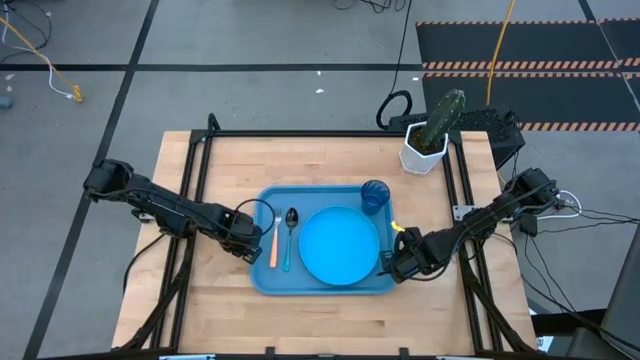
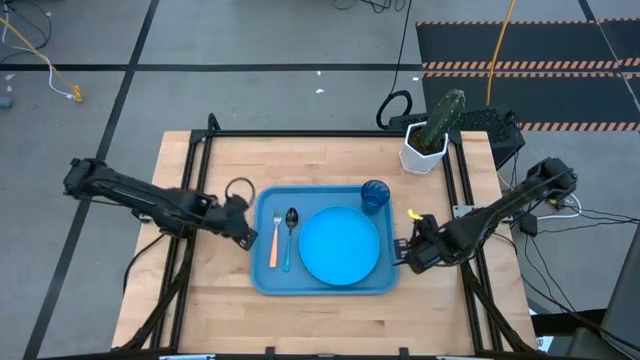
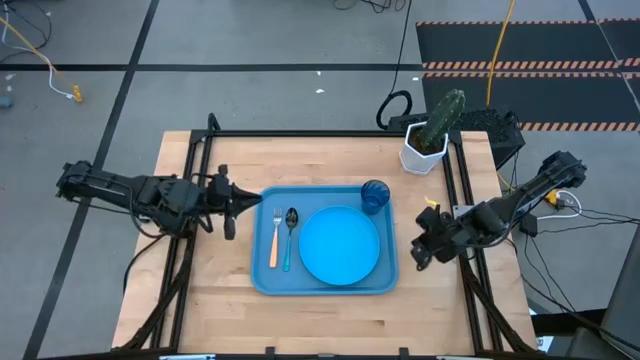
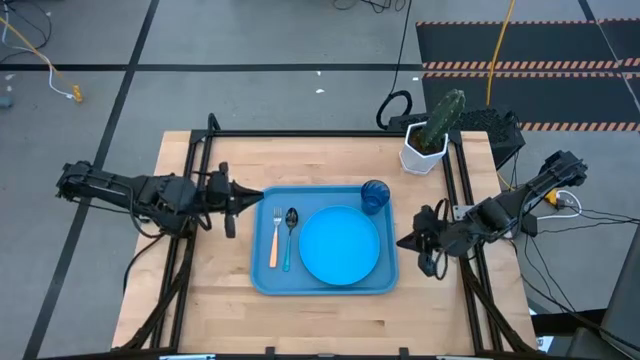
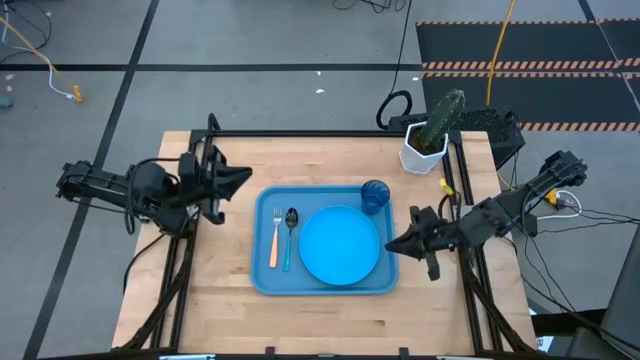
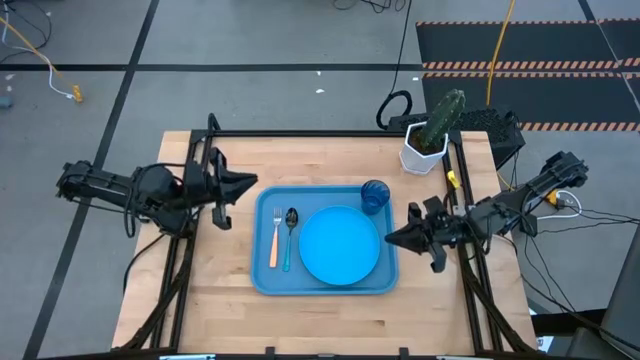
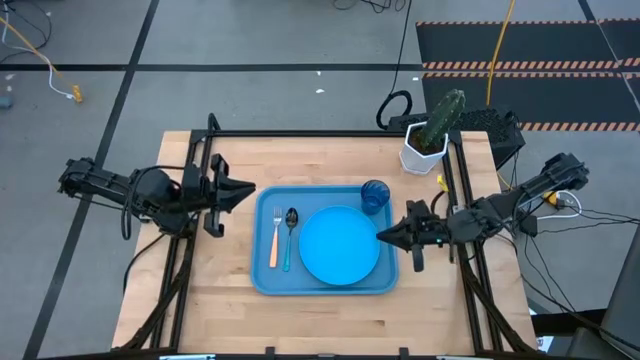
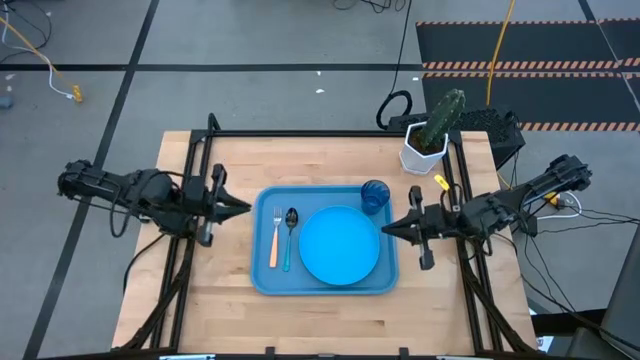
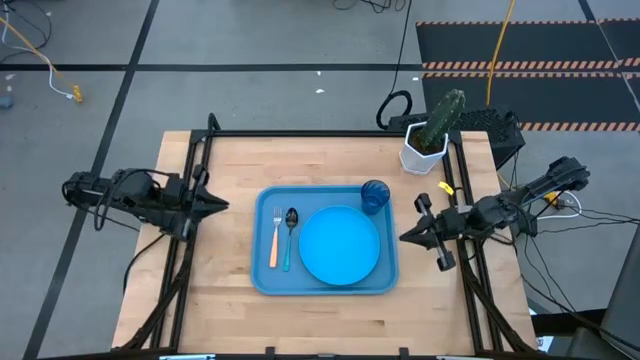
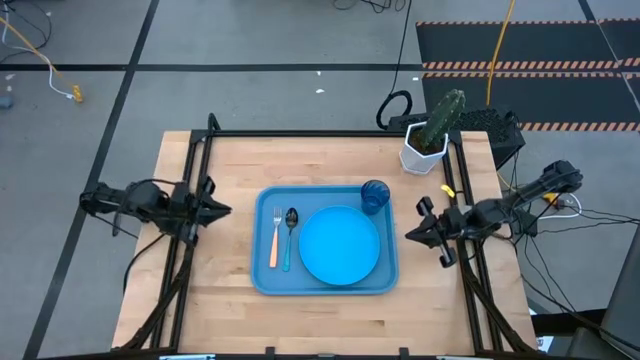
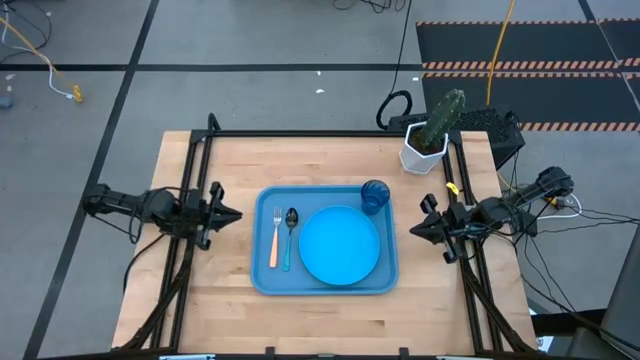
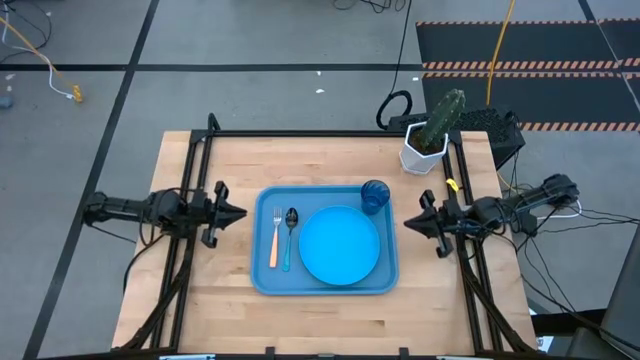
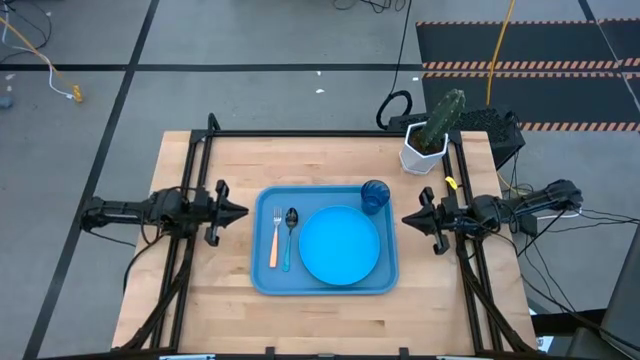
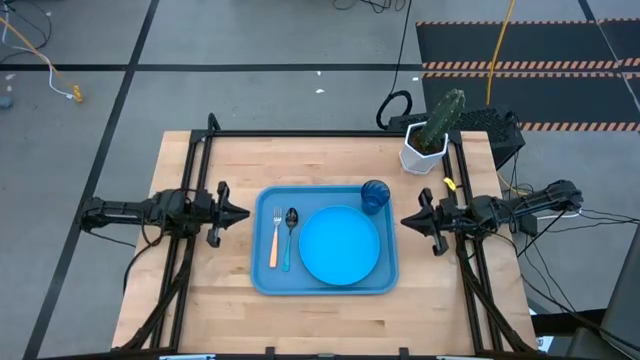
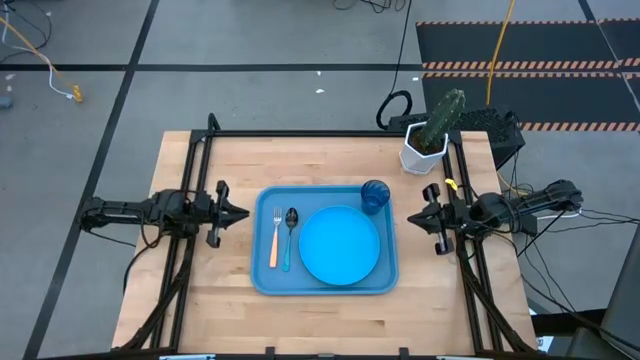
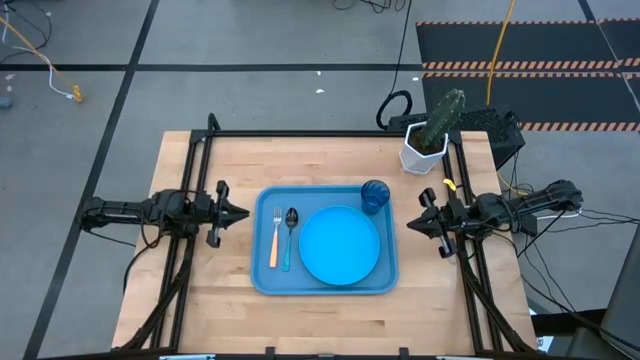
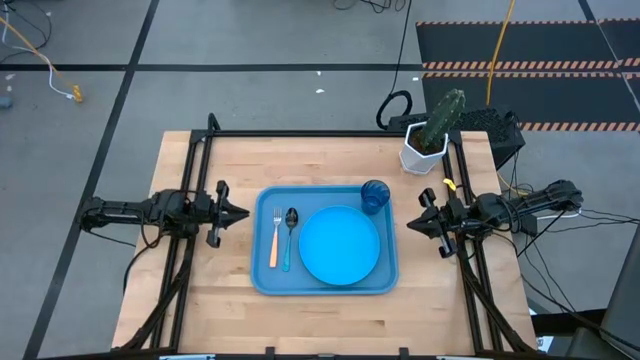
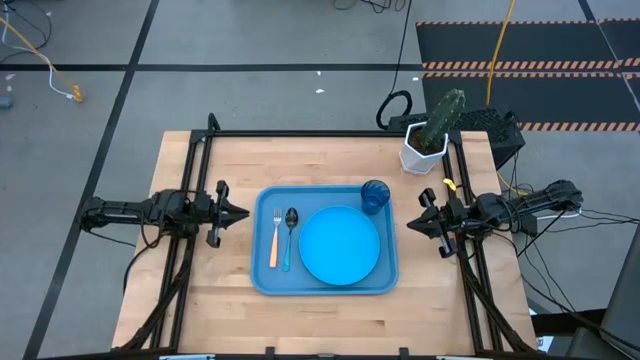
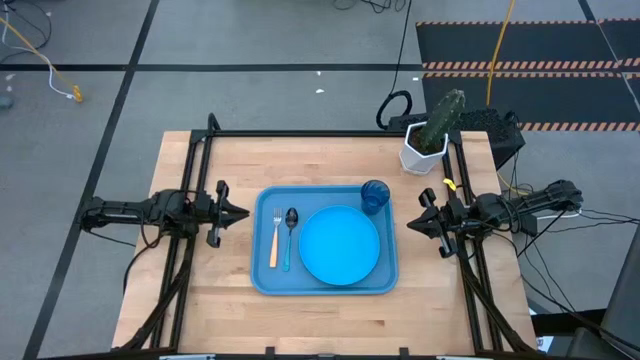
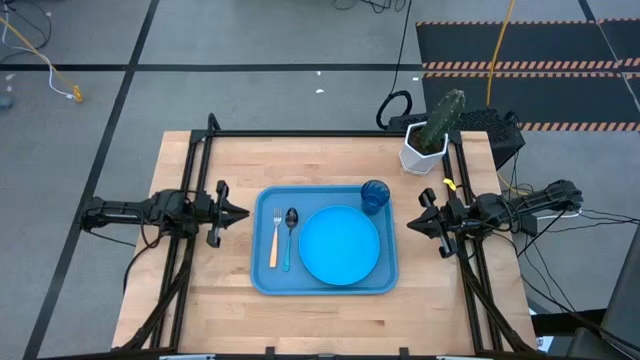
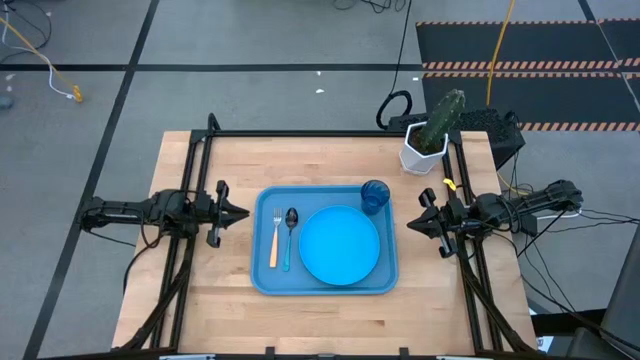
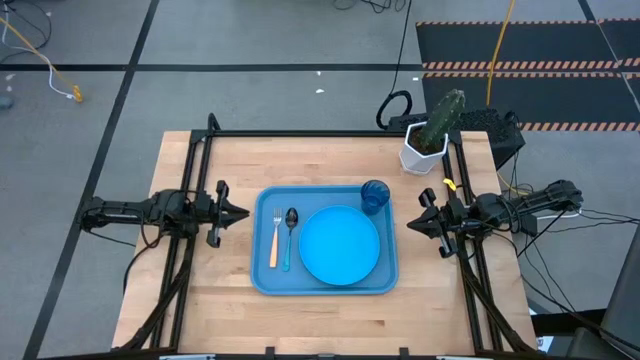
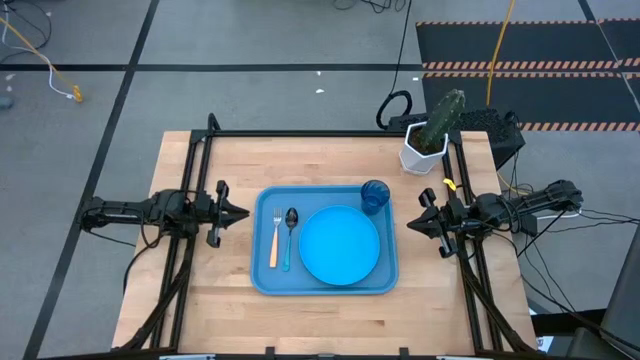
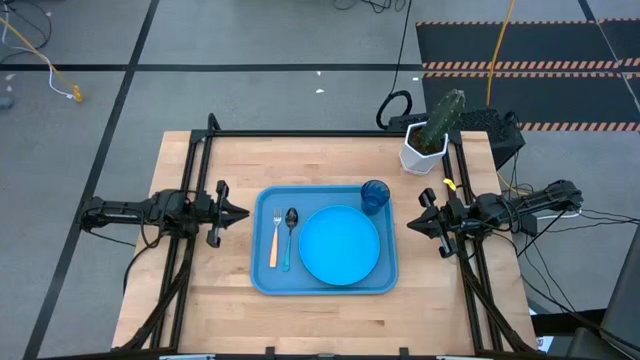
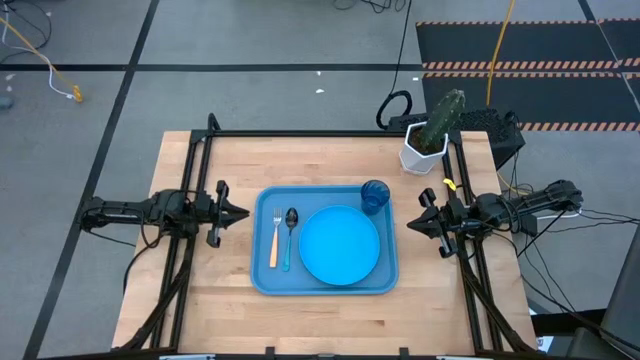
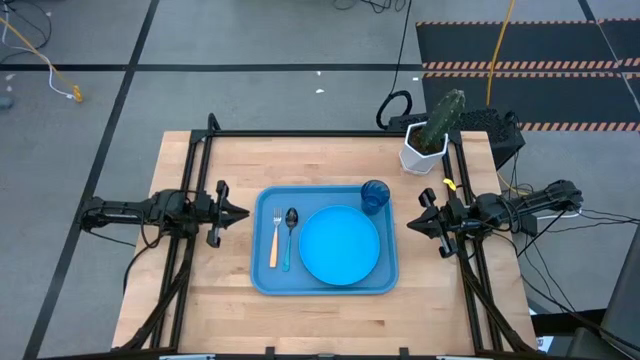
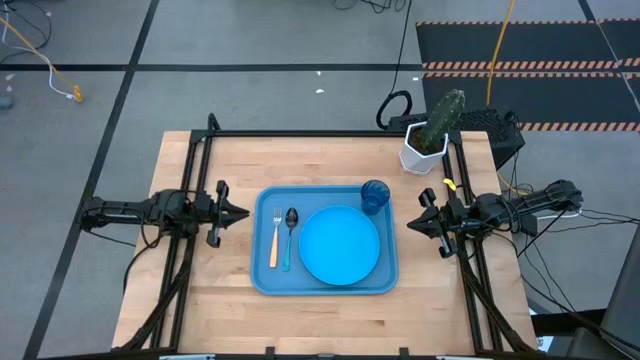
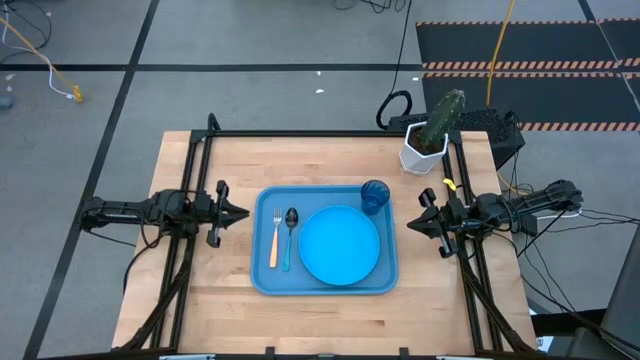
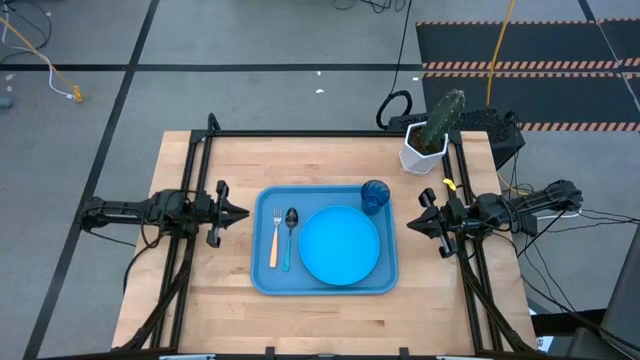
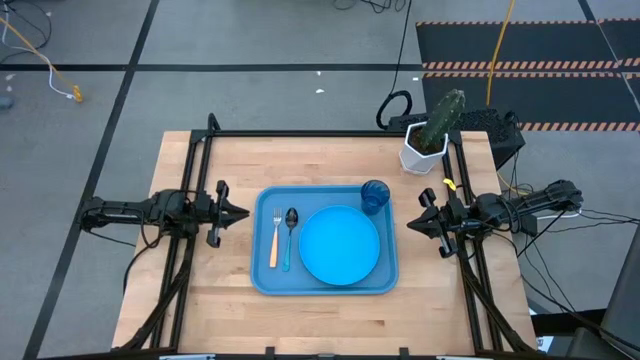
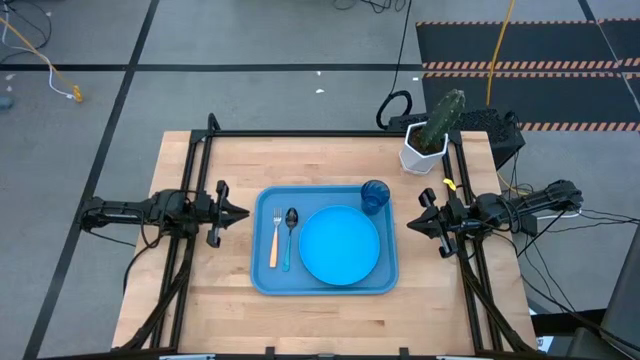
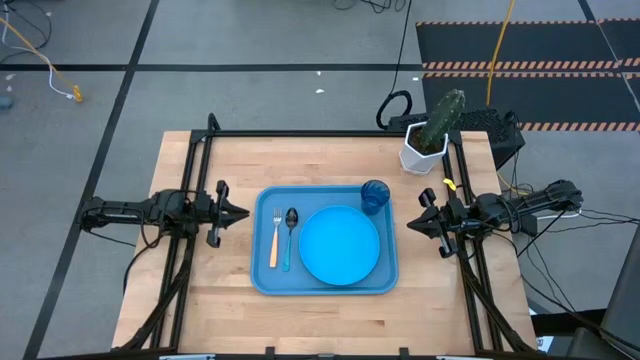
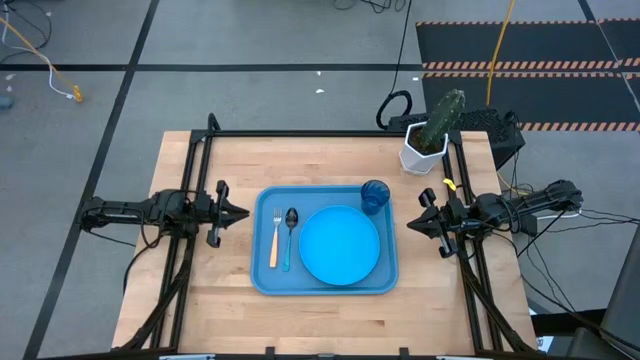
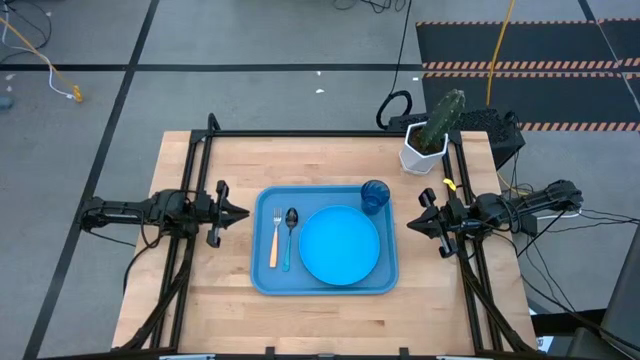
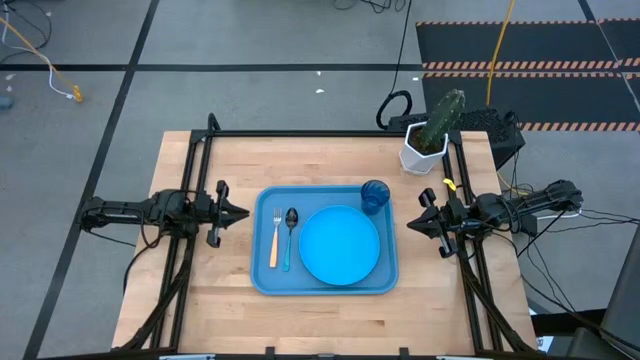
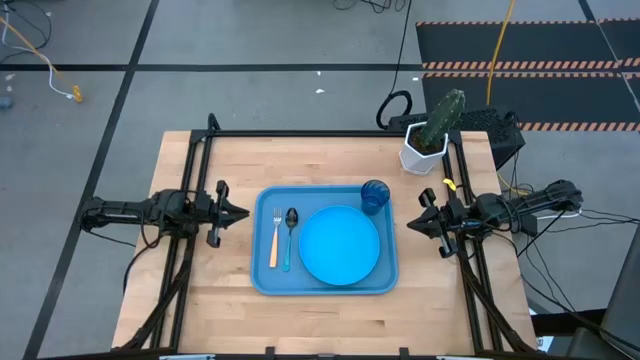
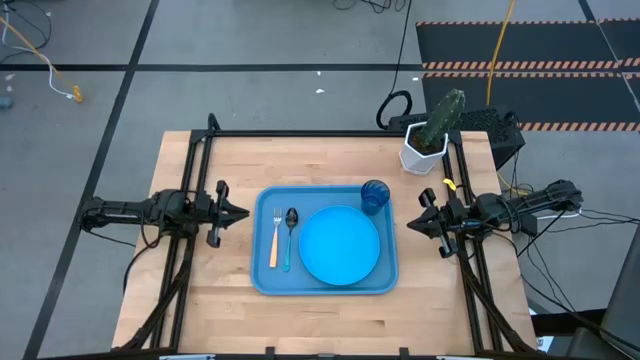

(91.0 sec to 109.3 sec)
Task: Pick and place plate/cup/fork/spoon on tray
Return to Home Position

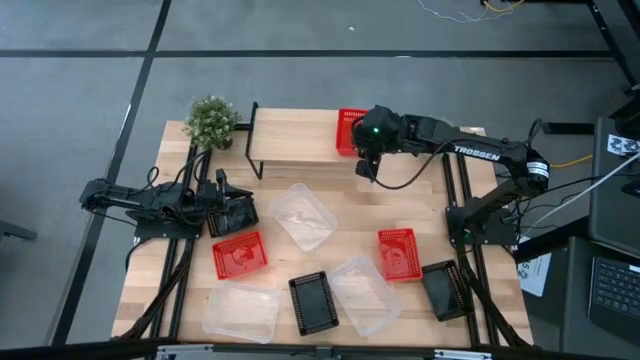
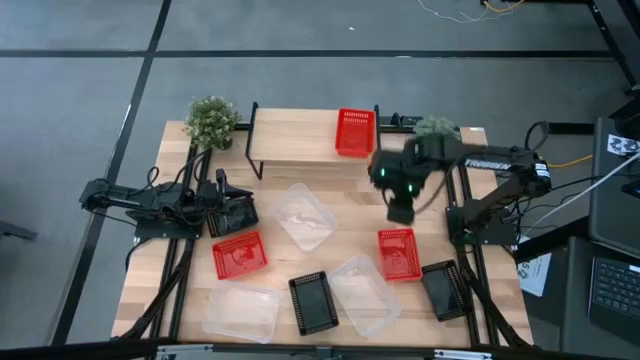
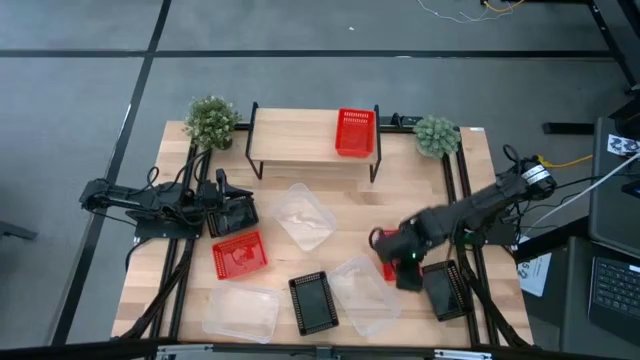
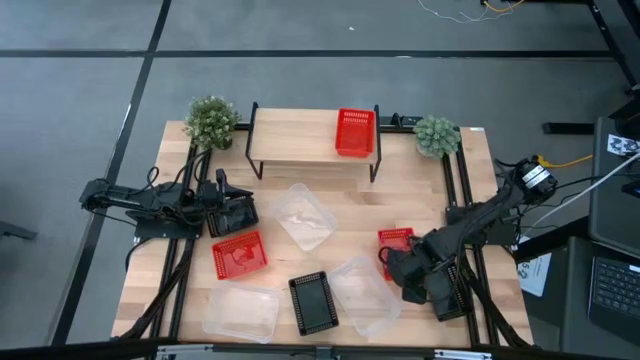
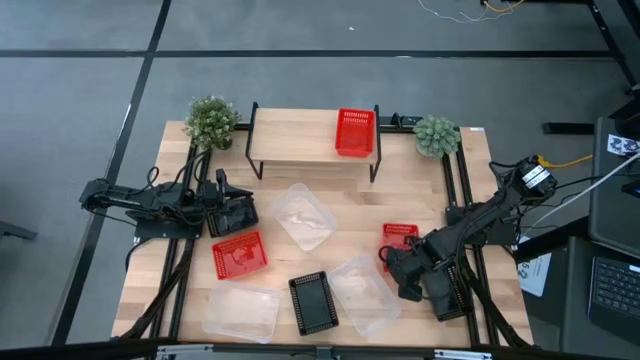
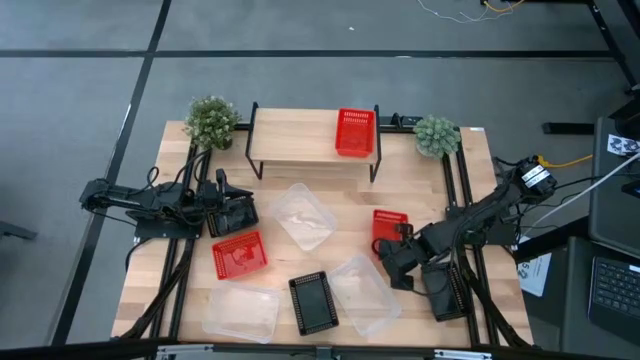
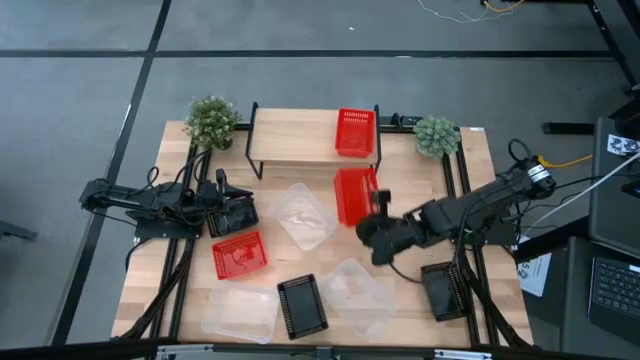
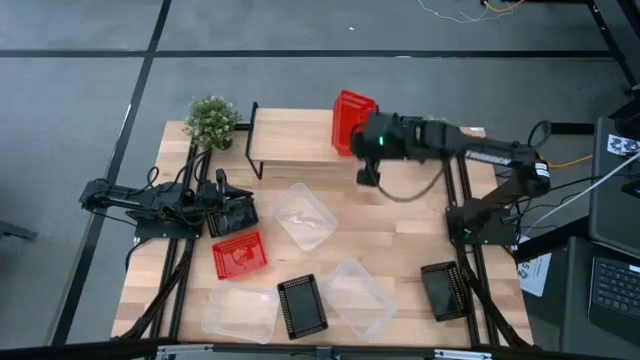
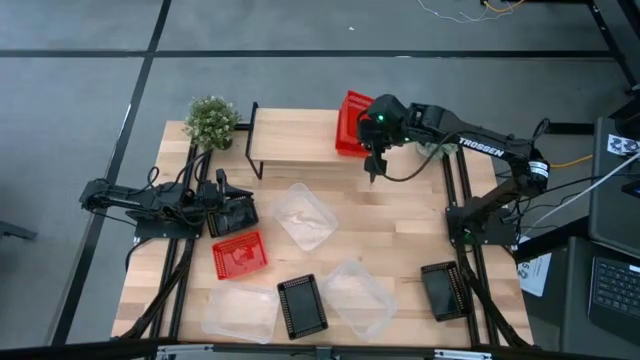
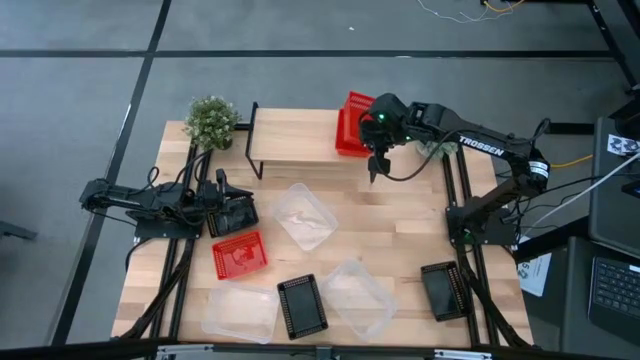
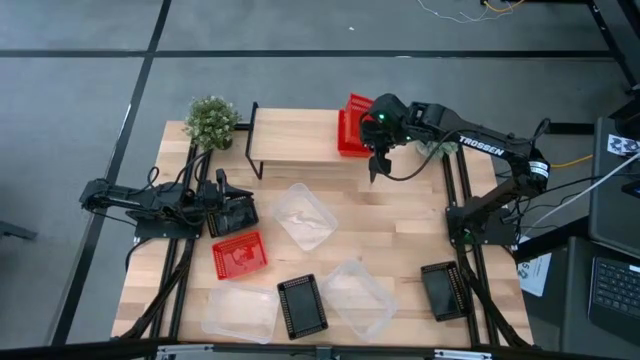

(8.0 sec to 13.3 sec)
Task: Stack baskets on shelf by color
Stack the right red bin on top of the red bin on the shelf
